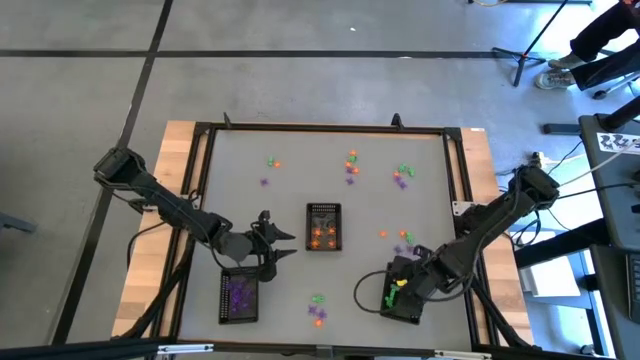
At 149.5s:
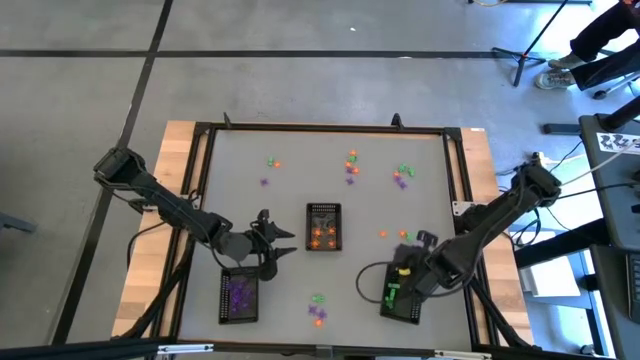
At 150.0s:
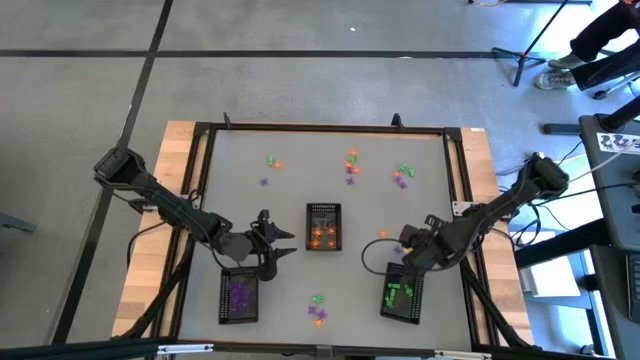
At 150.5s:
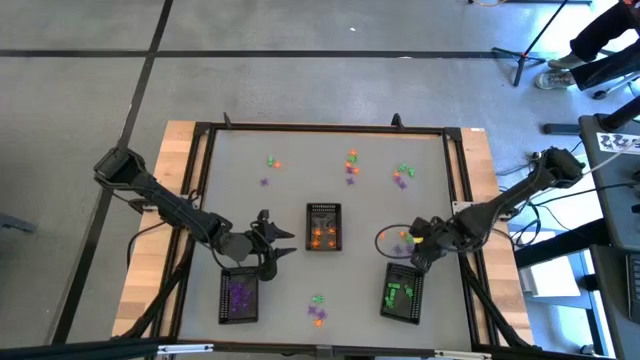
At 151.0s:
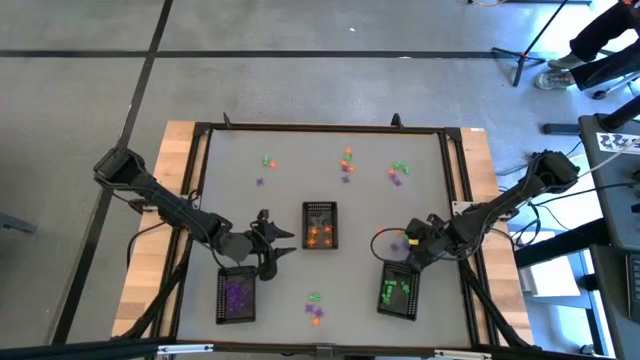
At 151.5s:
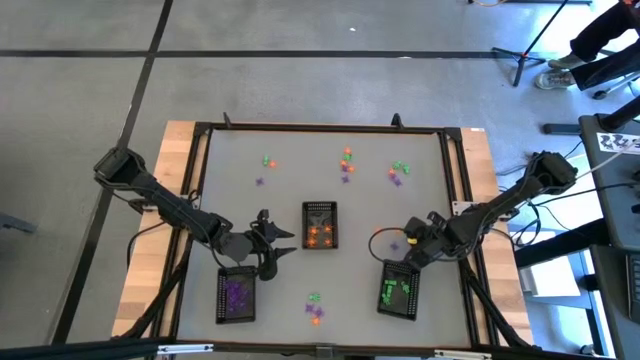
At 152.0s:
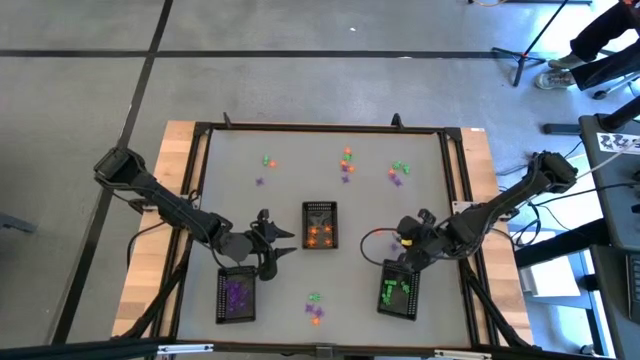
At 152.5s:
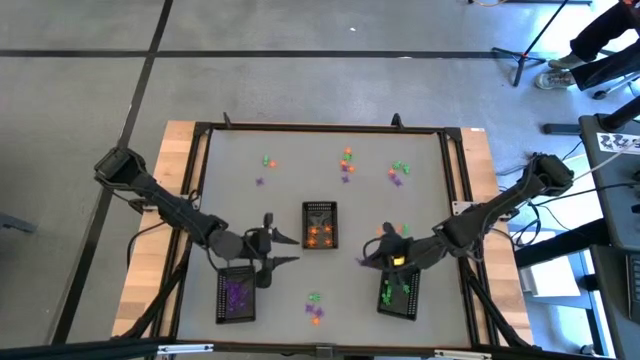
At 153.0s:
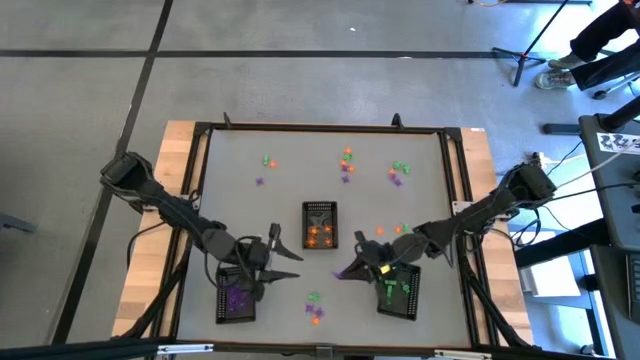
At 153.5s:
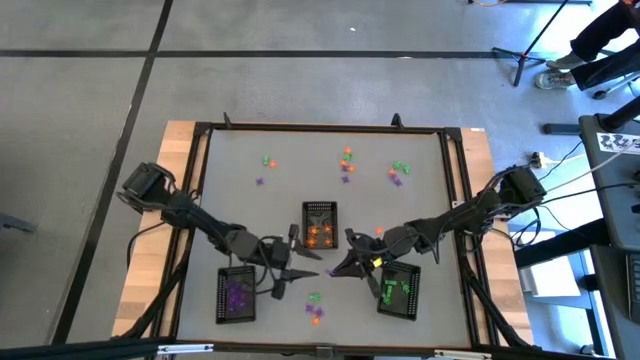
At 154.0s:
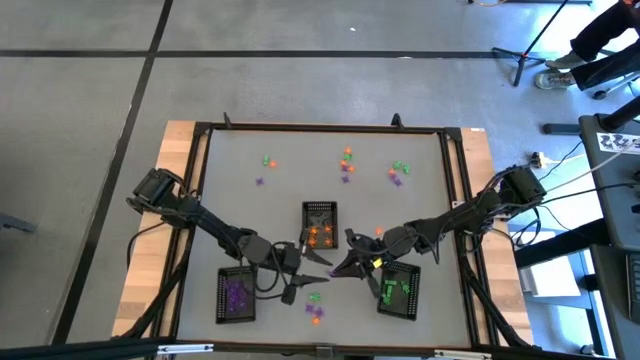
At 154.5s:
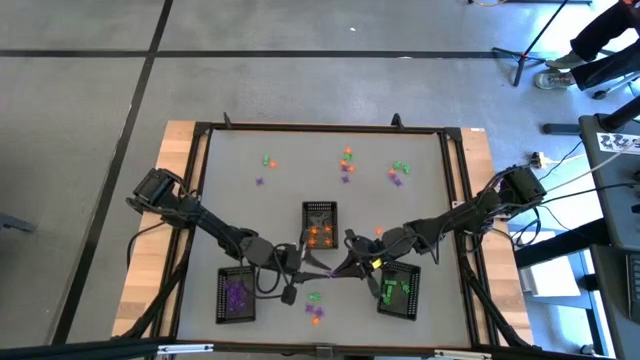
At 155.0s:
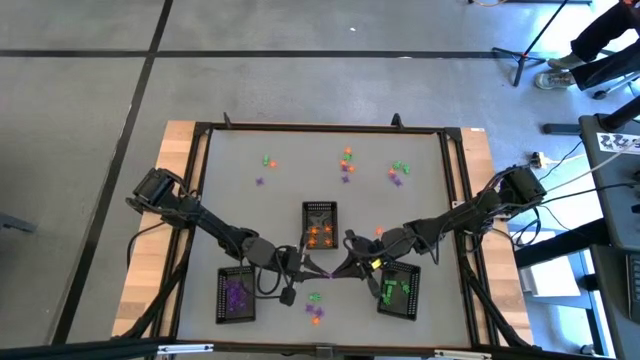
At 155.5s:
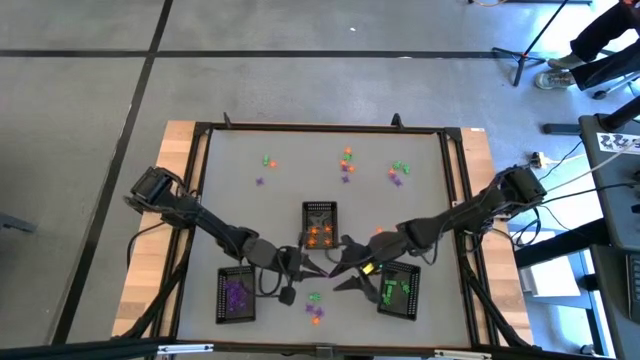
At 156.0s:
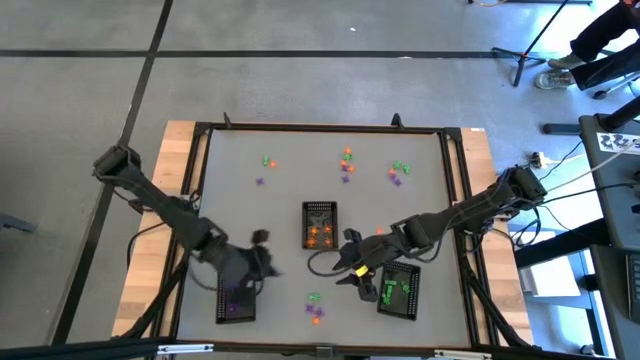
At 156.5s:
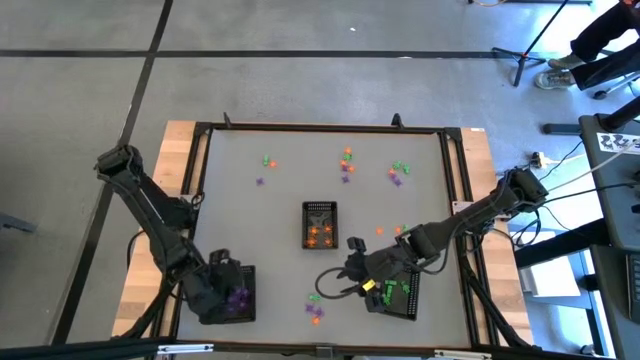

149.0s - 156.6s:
Task: Sort Halloween decoration
Put the violet spider toy into the bottom left black bin

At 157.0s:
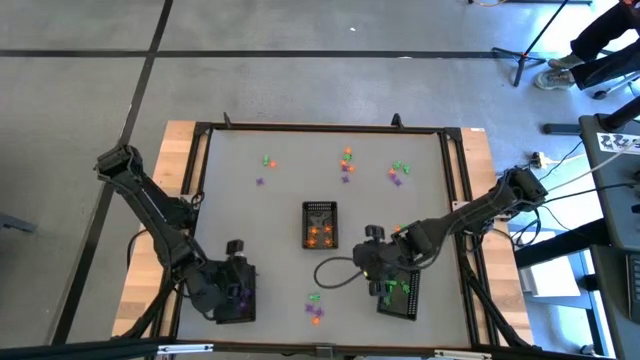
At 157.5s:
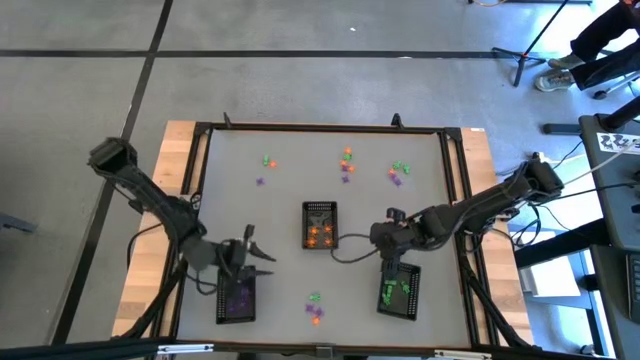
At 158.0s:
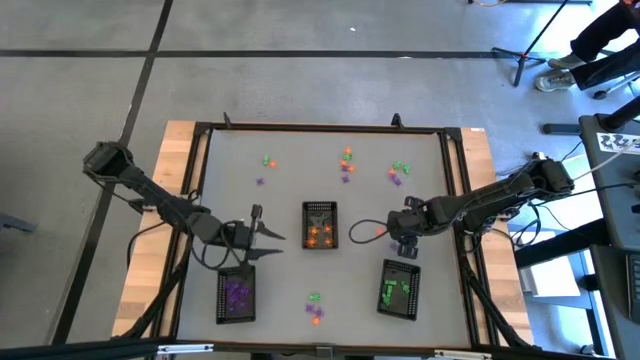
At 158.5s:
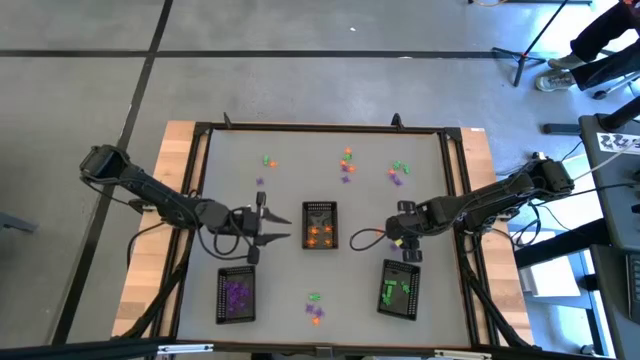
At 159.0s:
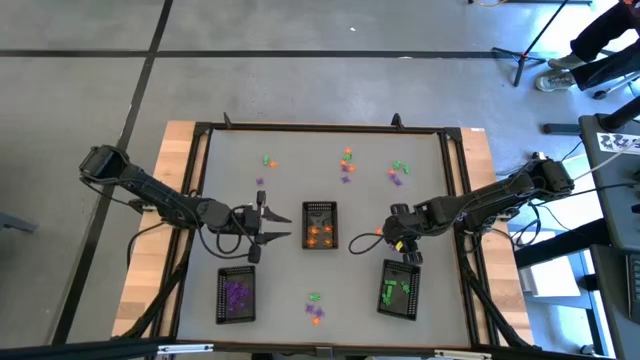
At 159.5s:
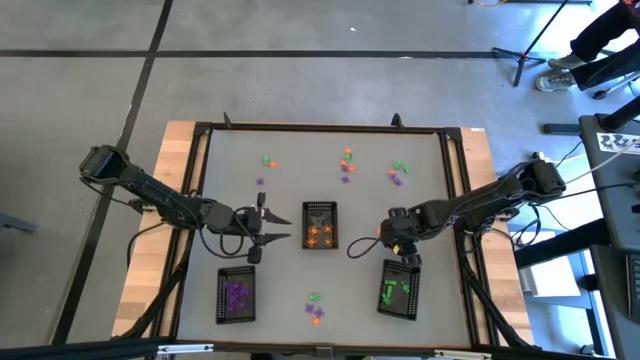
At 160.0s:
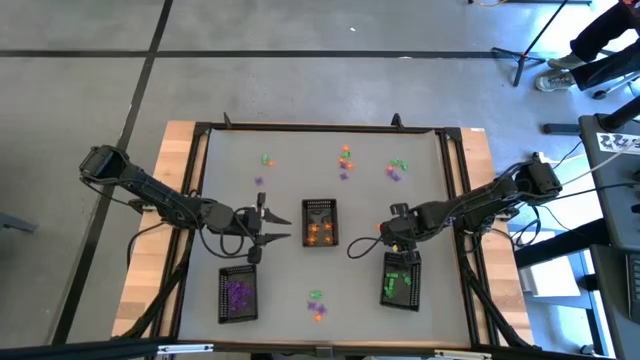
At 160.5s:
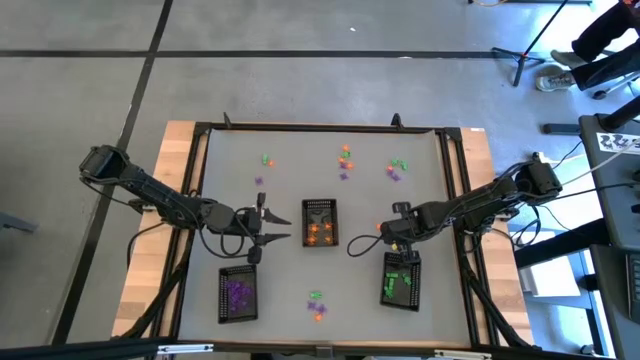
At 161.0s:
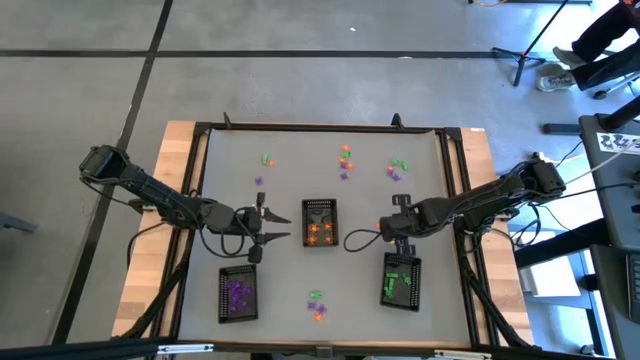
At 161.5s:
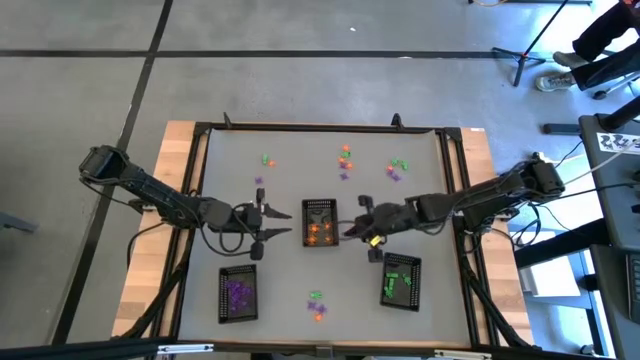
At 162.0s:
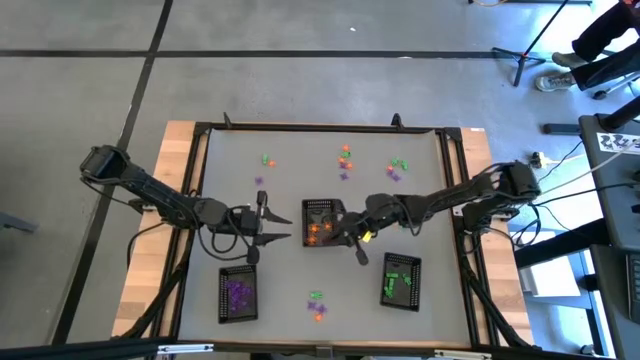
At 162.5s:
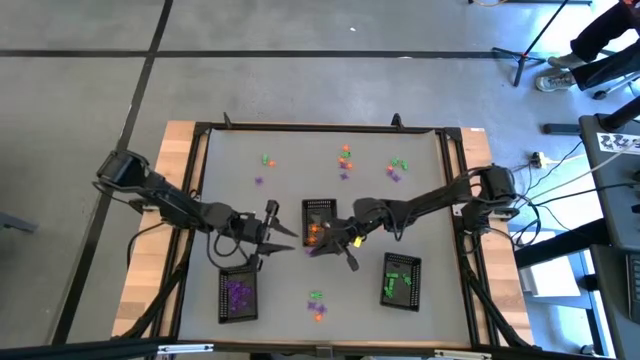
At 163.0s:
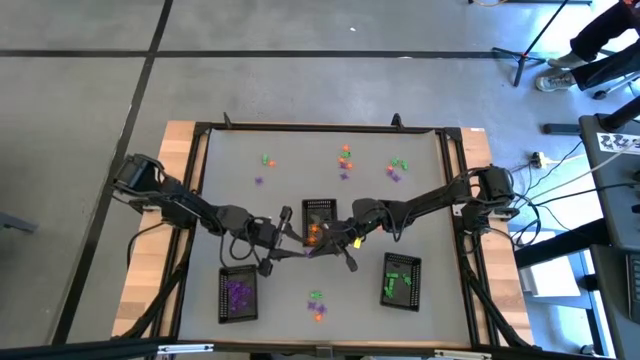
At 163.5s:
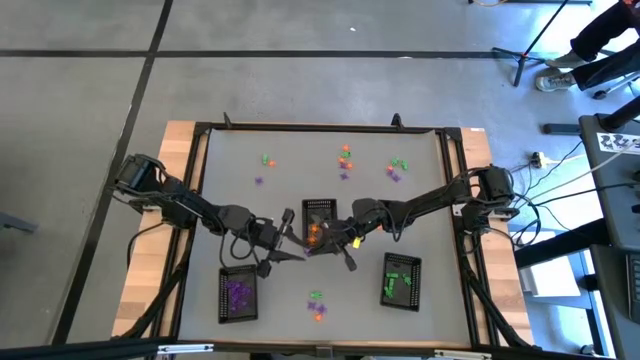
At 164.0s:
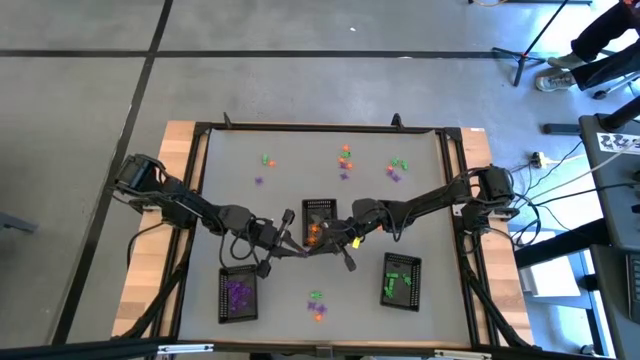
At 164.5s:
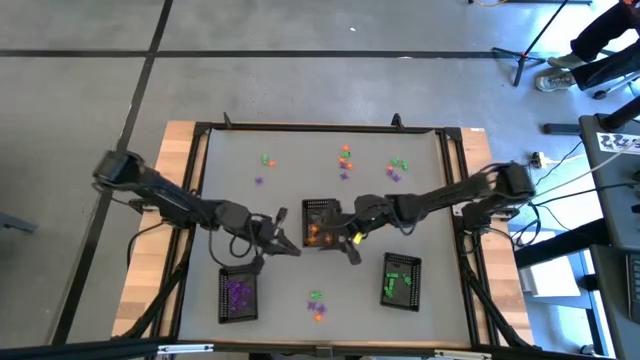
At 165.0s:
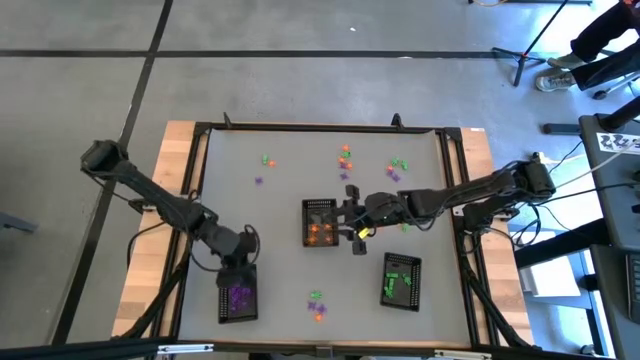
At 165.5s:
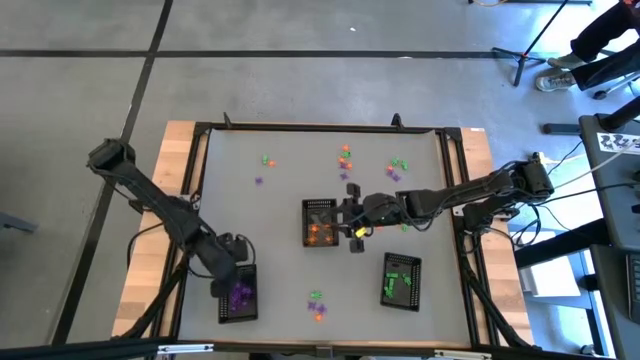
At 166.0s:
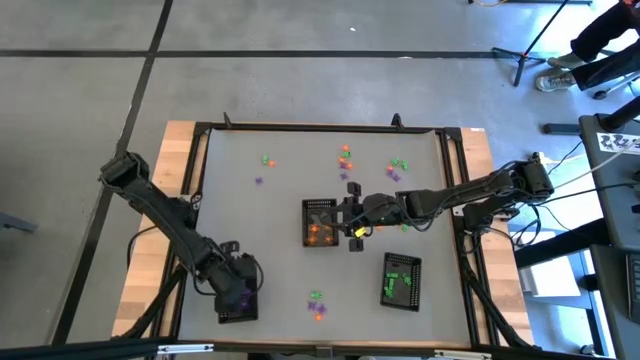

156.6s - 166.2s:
Put the violet spider toy into the bottom left black bin

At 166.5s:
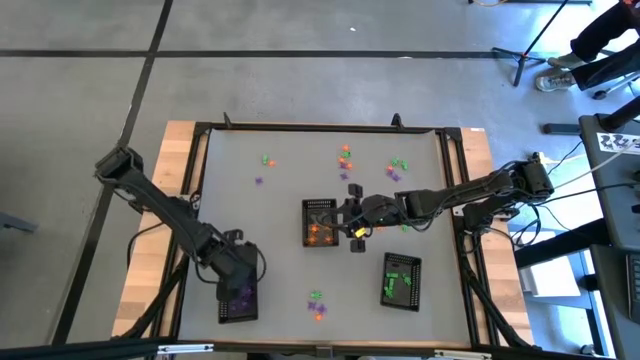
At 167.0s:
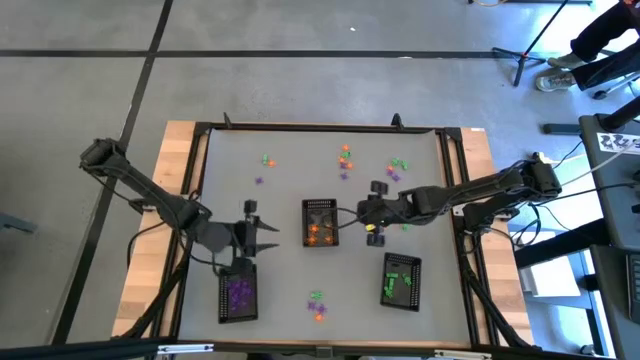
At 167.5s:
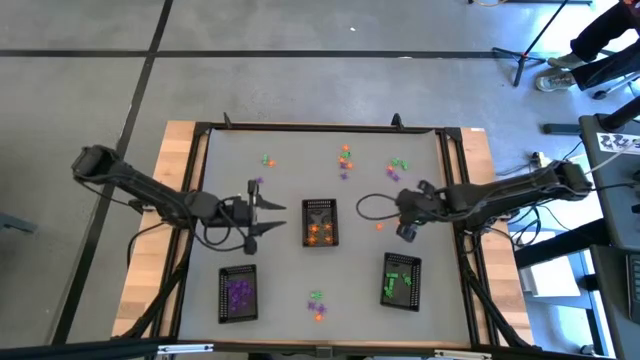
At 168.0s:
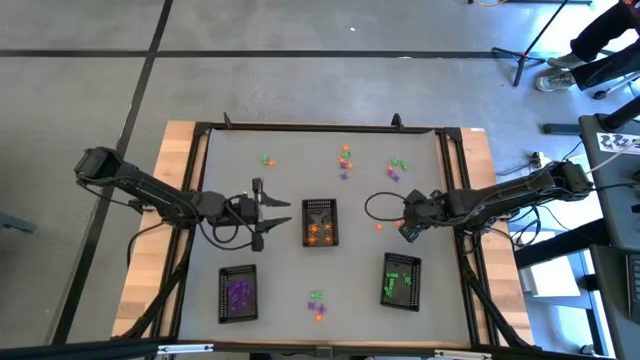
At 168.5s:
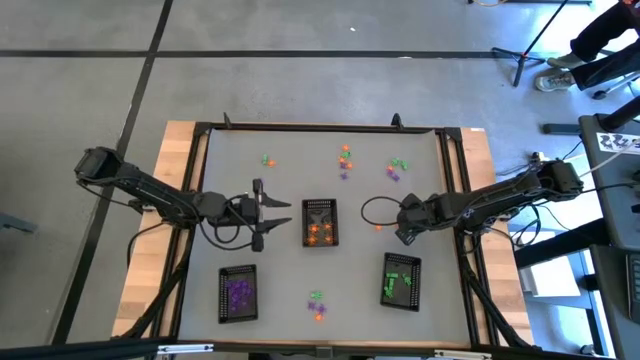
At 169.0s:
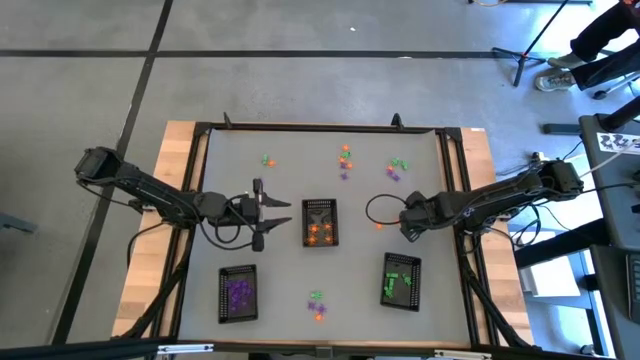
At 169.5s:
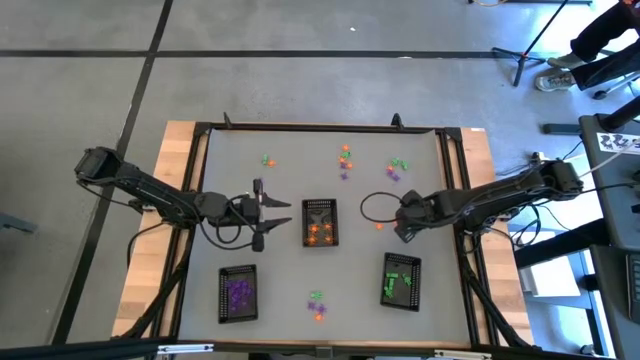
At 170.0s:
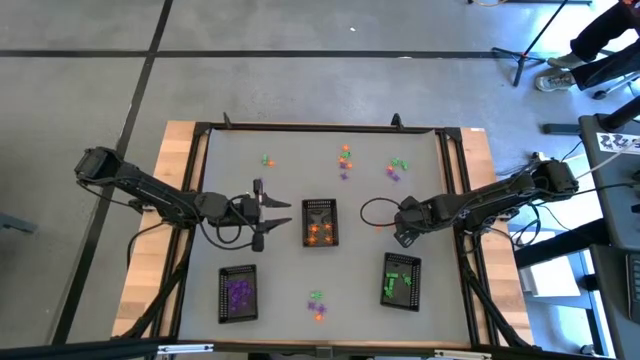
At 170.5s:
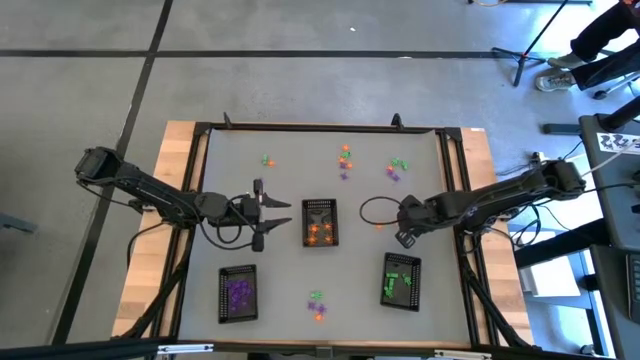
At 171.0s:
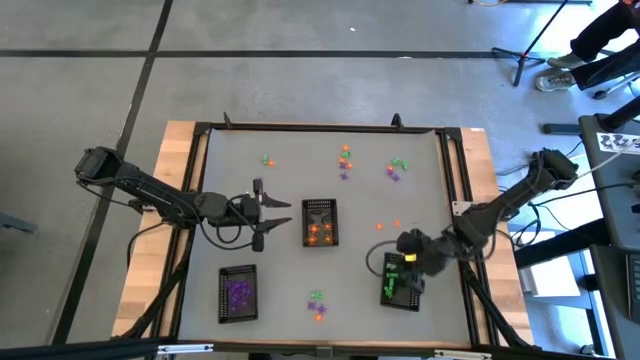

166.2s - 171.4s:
Put the green skeleton toy into the bottom right black bin
